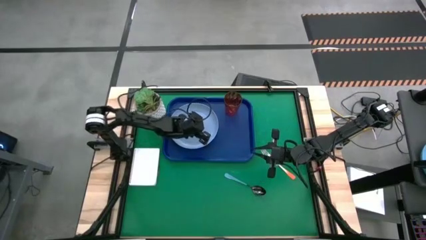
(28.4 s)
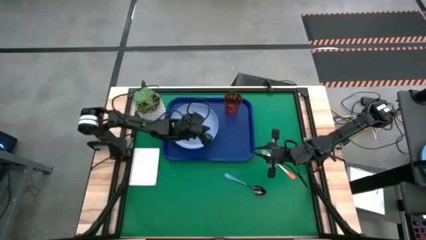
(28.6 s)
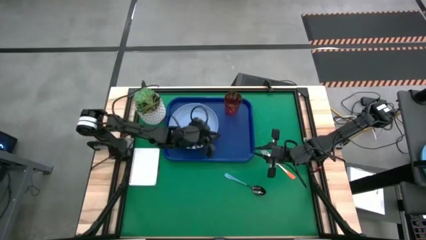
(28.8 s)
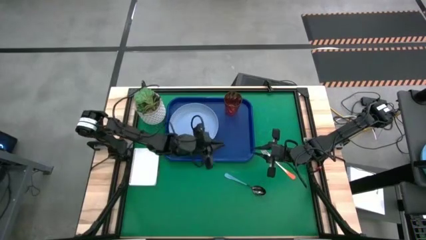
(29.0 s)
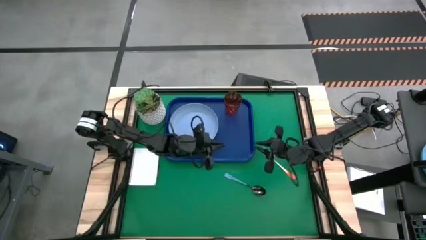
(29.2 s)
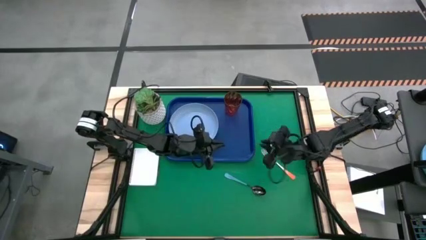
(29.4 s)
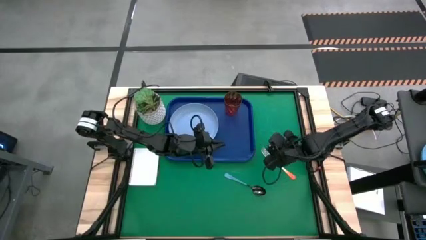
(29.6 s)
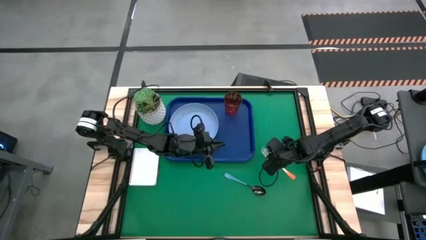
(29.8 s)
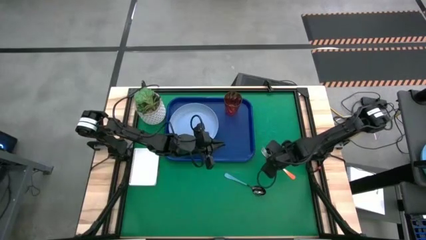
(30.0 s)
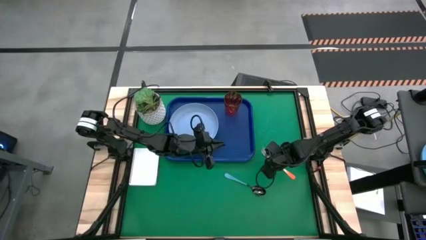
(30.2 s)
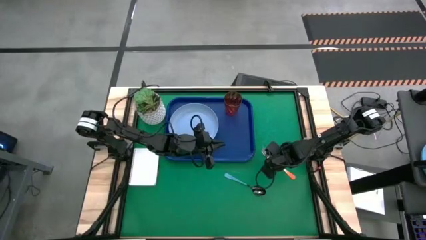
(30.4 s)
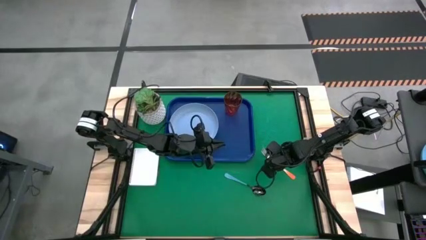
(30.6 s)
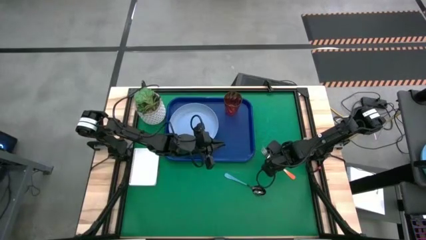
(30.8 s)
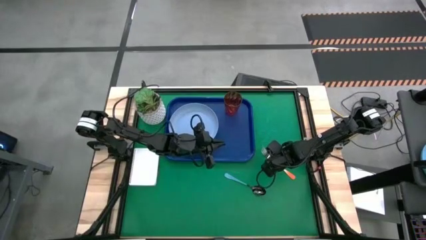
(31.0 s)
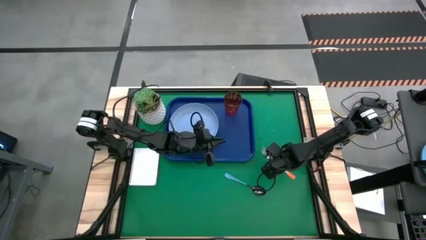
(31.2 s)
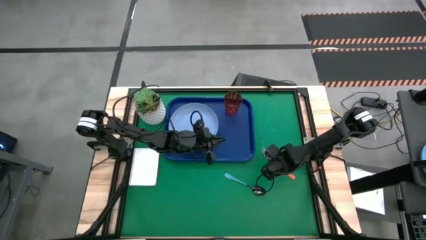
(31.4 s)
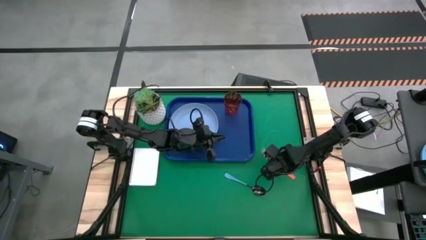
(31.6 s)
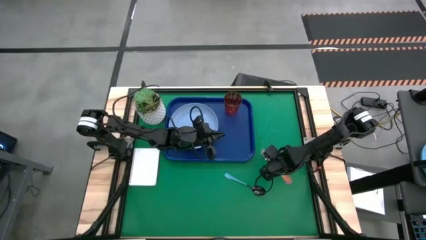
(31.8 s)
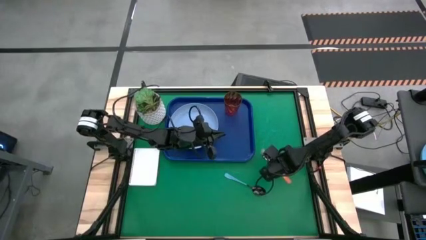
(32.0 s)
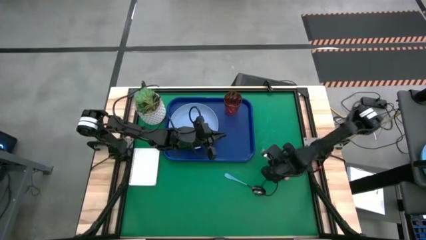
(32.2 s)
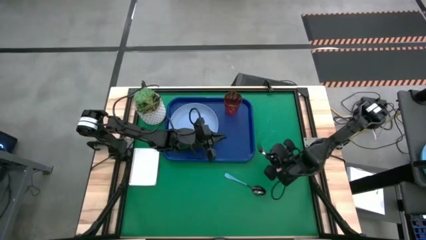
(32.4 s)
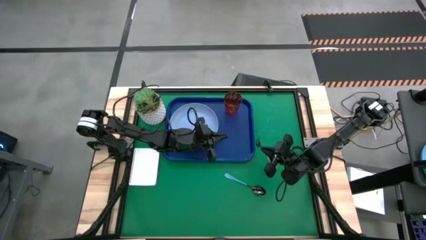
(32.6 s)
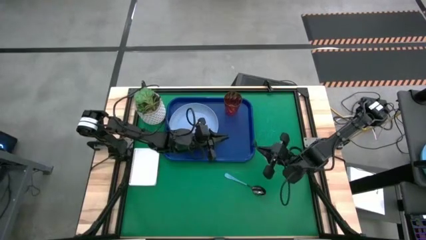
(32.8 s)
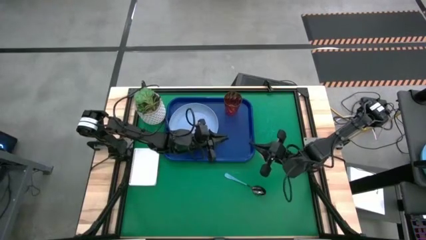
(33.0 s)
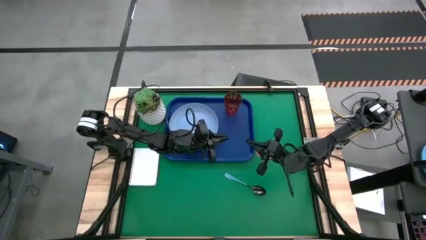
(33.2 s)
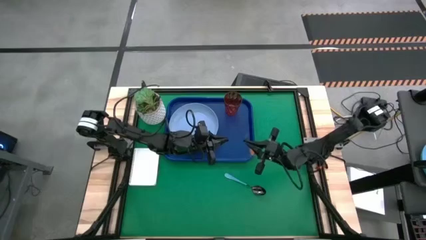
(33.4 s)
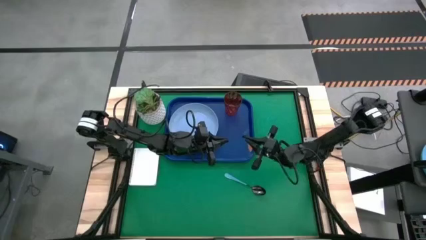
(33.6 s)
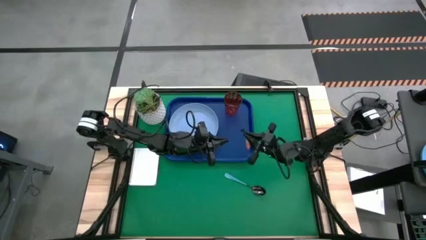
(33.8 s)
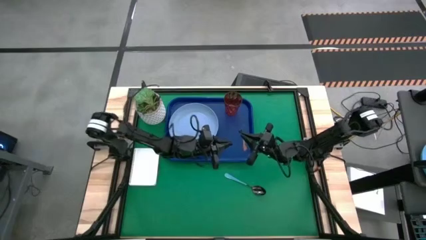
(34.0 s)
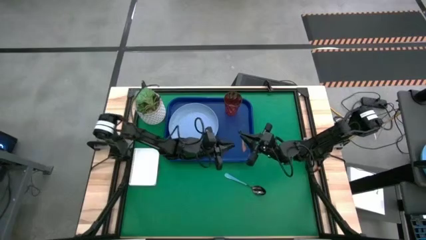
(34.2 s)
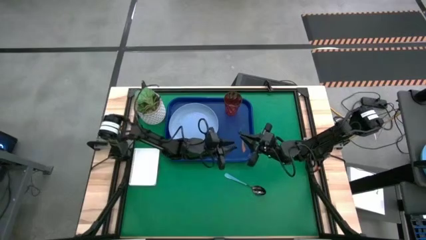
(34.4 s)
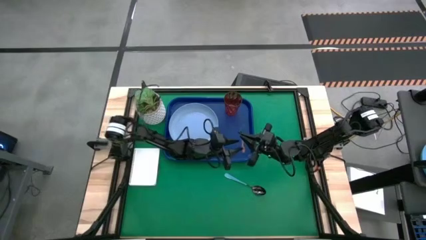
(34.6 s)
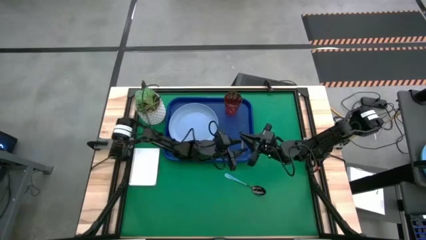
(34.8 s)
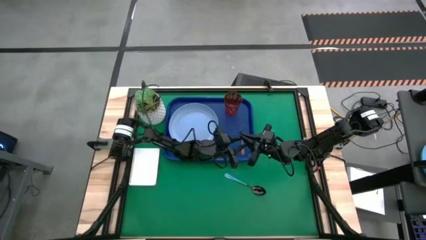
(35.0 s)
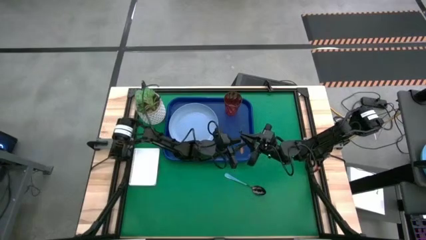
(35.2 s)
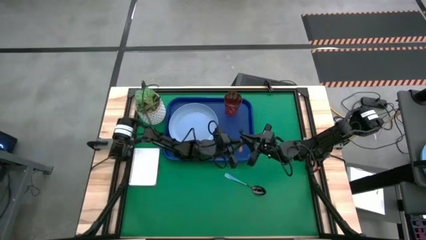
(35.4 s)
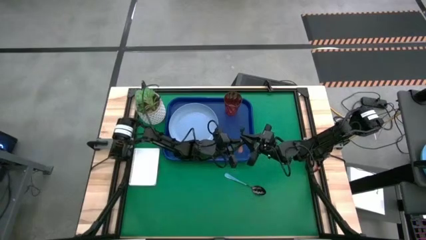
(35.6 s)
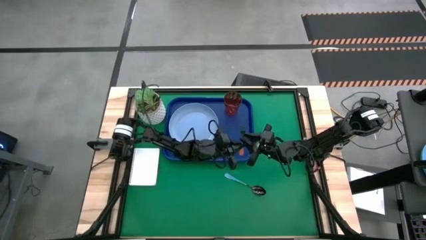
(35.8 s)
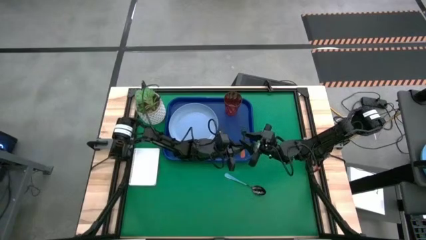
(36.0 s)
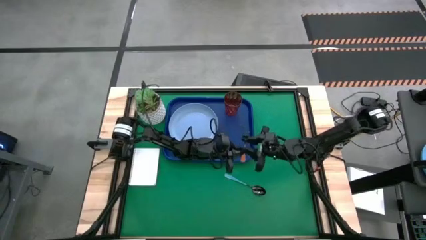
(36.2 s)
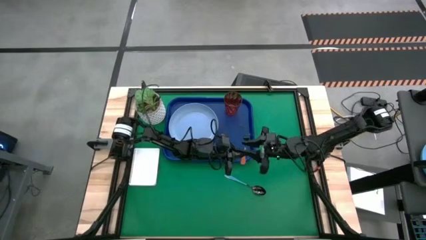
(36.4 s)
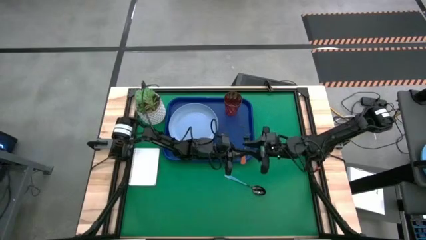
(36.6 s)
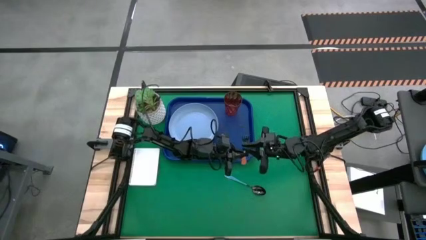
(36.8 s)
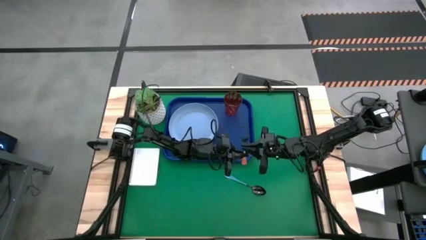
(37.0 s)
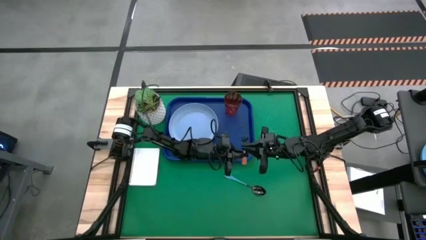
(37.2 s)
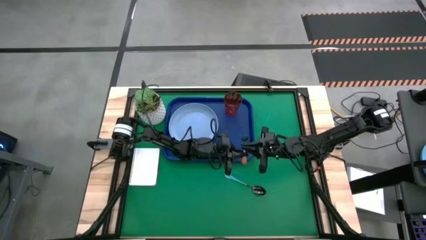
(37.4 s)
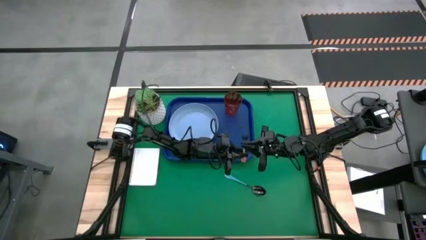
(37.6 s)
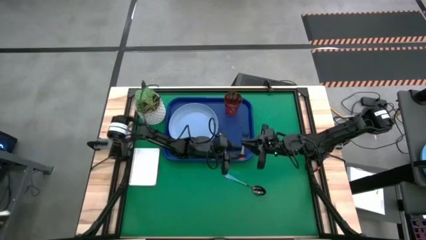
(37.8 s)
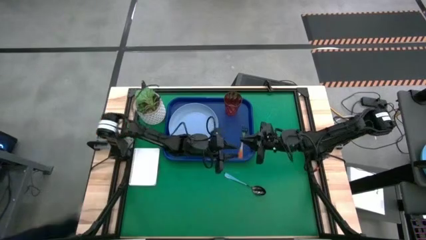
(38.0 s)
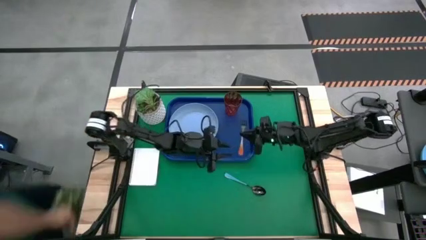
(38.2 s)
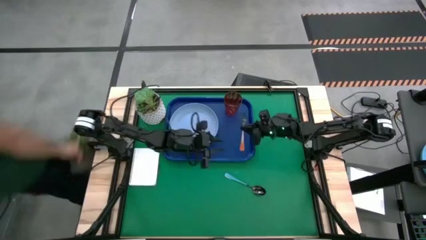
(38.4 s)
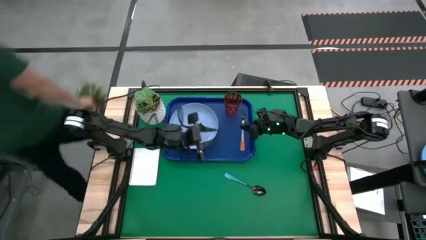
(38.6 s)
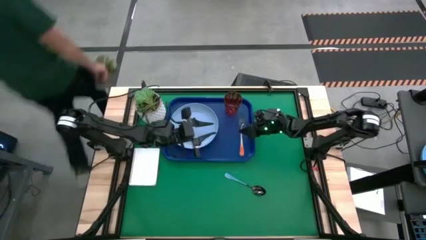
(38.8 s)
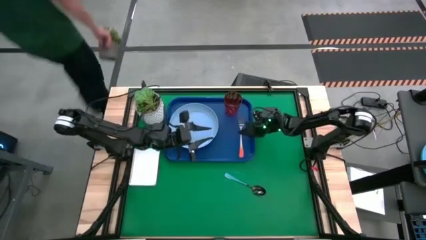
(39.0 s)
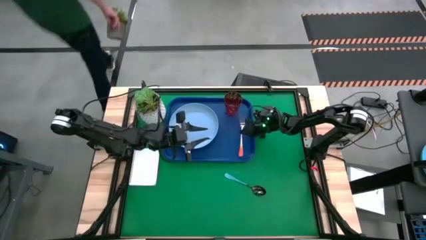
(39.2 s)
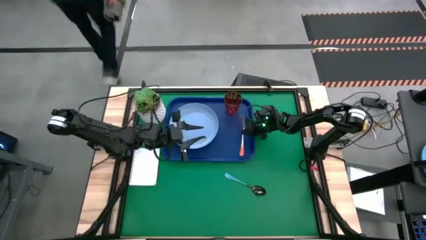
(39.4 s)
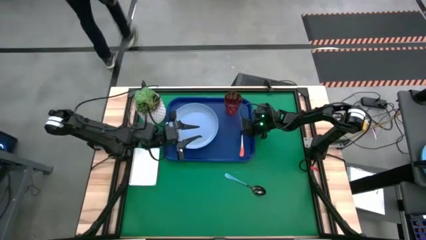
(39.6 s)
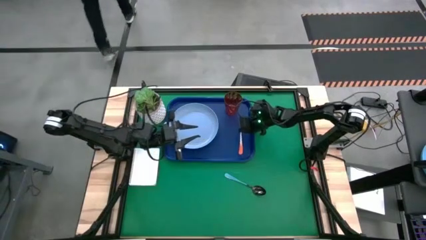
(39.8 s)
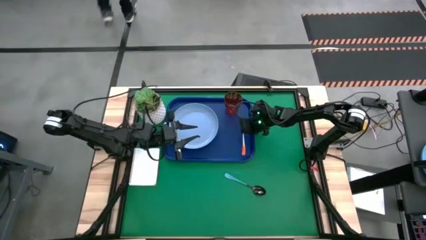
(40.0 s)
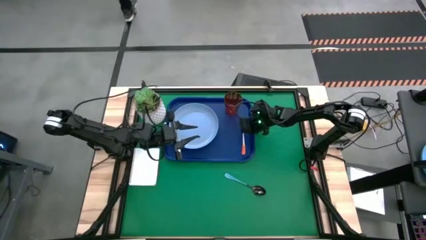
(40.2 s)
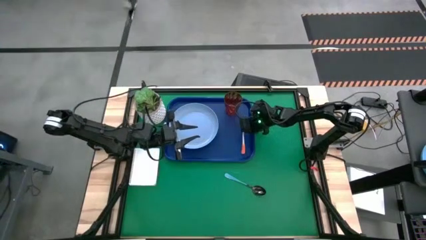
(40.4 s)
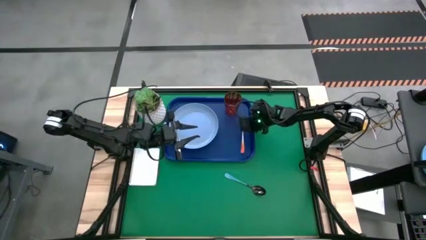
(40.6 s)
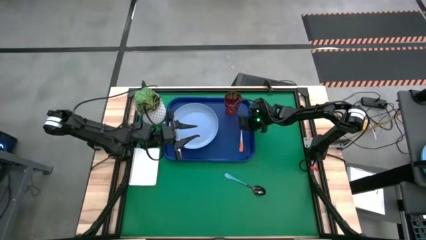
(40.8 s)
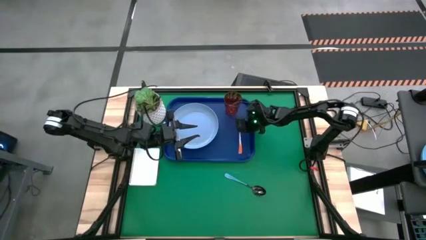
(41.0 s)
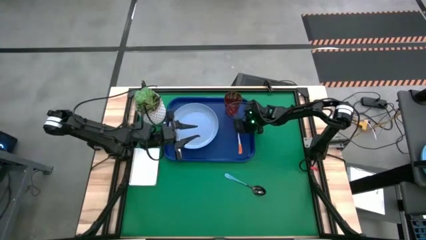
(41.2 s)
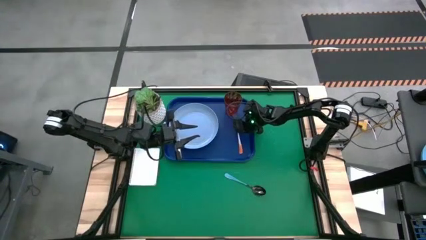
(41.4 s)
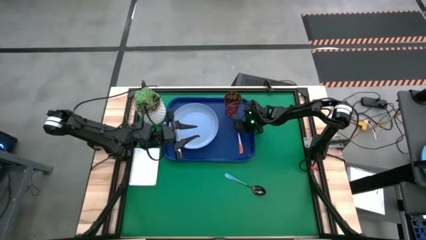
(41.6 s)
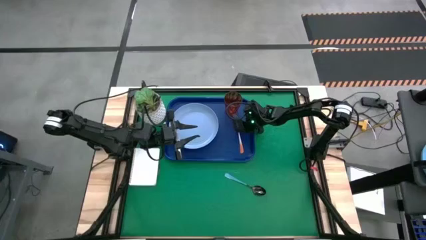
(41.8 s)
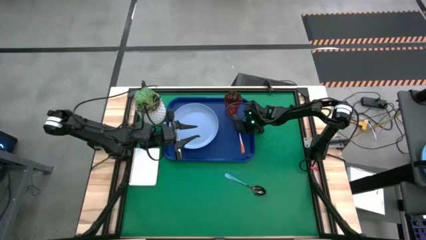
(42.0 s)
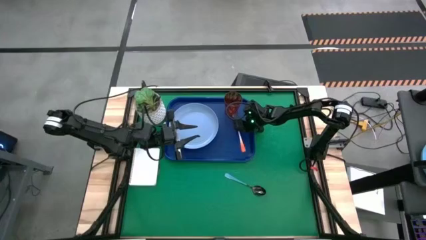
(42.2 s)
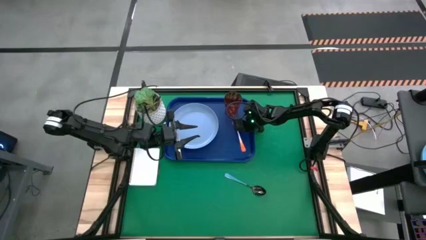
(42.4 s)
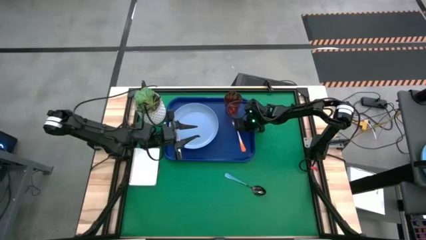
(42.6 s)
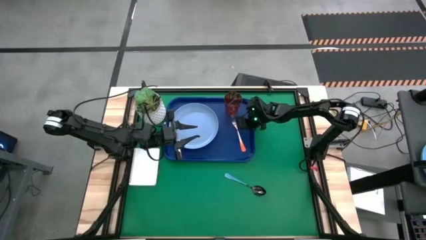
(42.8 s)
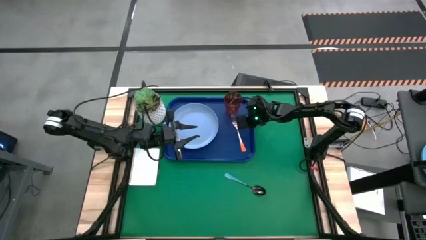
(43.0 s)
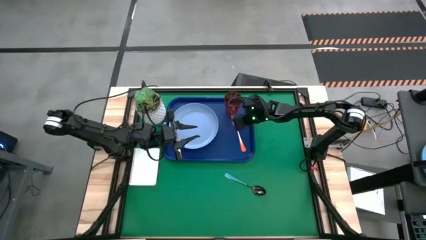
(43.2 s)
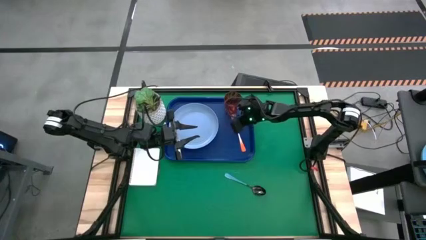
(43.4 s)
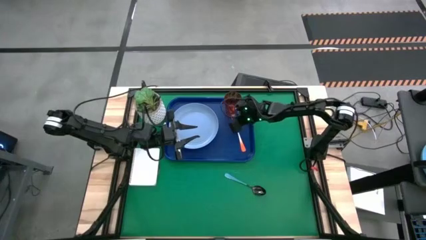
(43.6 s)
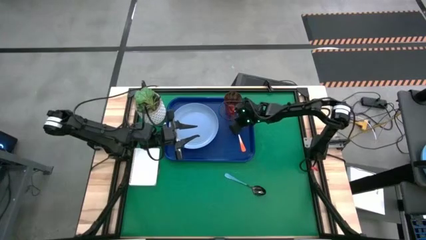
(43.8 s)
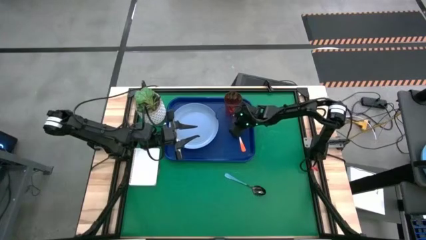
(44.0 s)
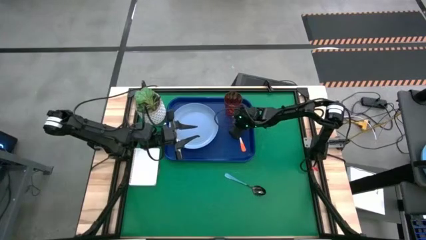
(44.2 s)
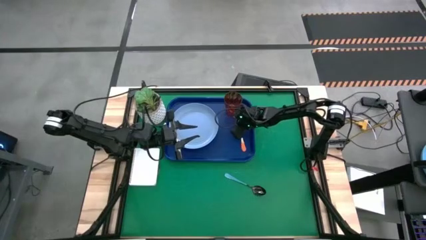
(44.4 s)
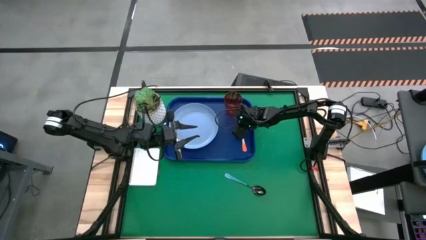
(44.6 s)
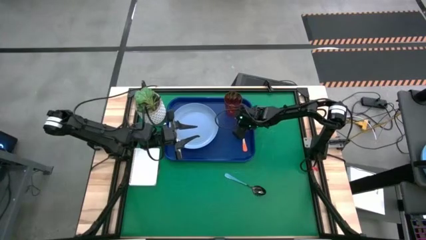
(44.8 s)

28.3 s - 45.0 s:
Task: Pick and place plate/cup/fork/spoon on tray
Put the orange fork on the blue serving tray to the bottom right of the brown cup
